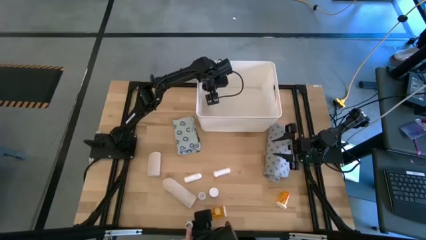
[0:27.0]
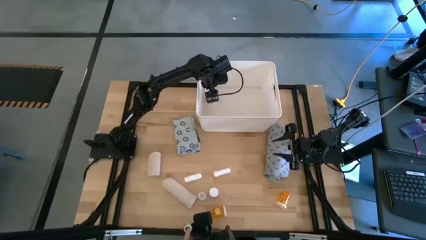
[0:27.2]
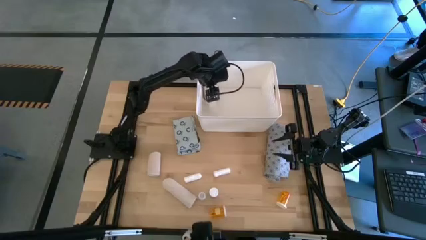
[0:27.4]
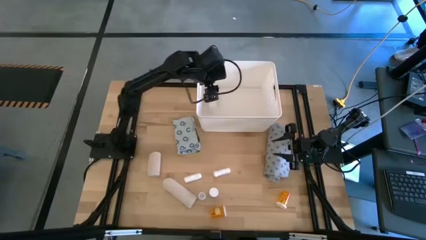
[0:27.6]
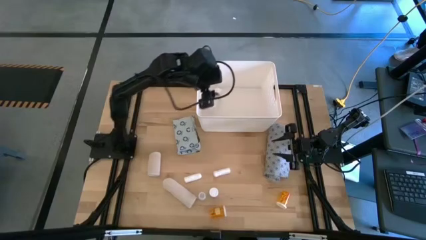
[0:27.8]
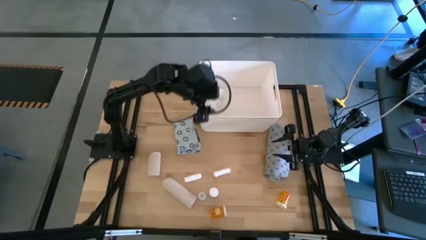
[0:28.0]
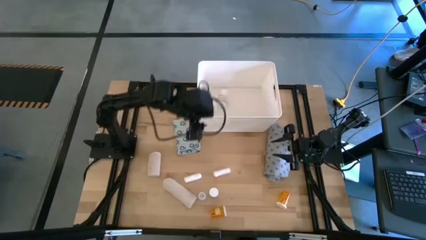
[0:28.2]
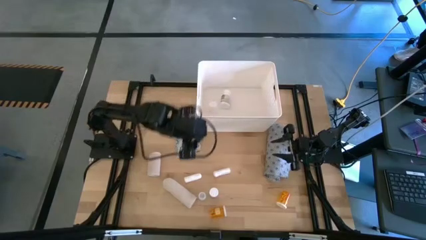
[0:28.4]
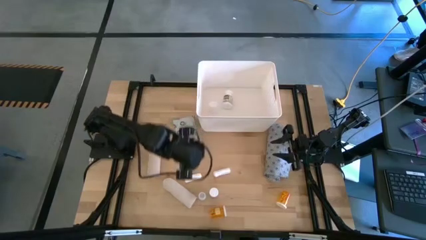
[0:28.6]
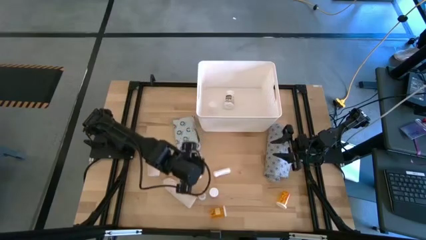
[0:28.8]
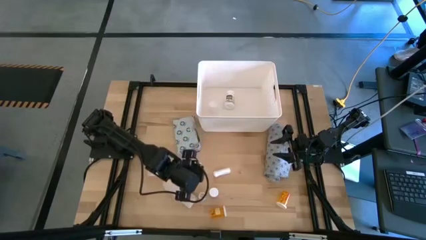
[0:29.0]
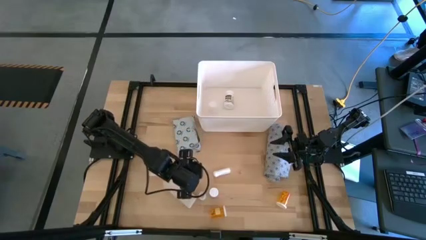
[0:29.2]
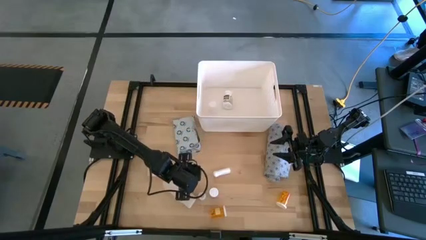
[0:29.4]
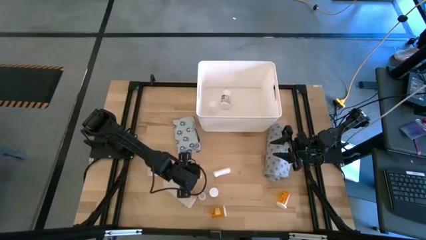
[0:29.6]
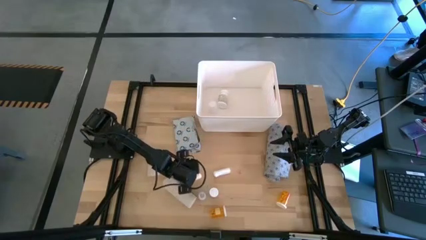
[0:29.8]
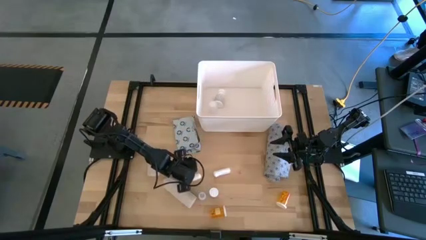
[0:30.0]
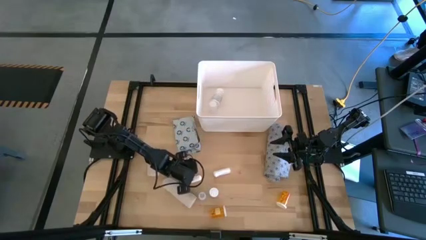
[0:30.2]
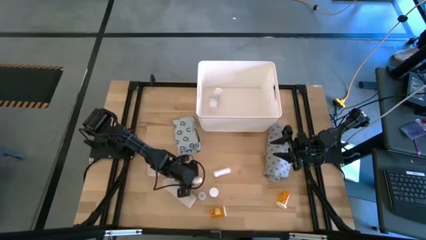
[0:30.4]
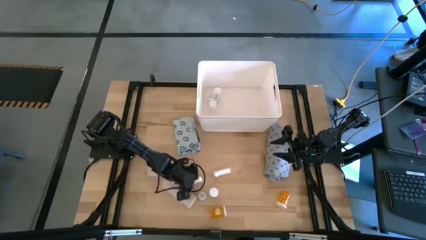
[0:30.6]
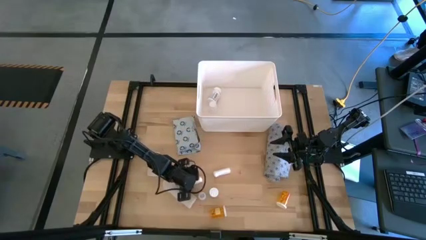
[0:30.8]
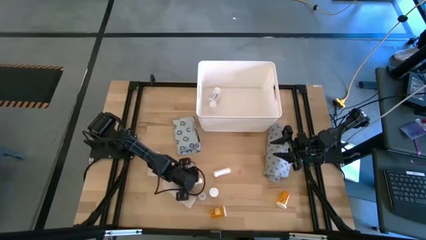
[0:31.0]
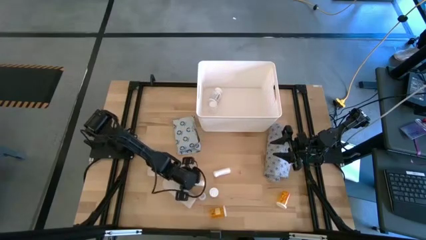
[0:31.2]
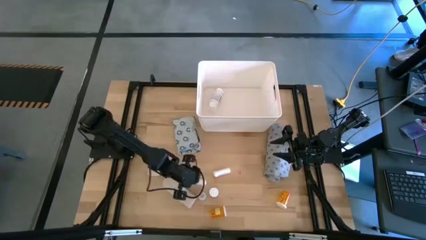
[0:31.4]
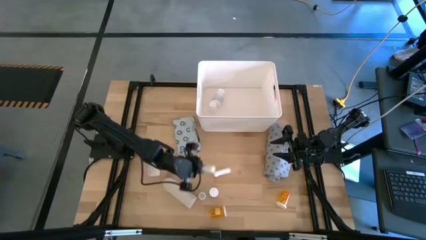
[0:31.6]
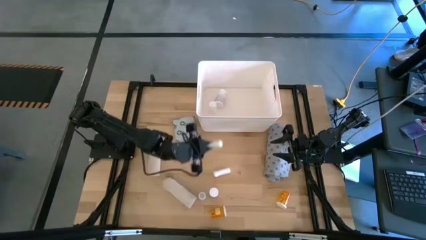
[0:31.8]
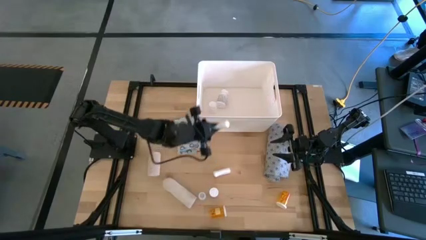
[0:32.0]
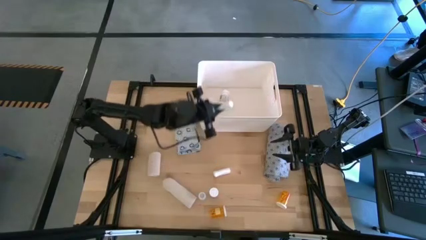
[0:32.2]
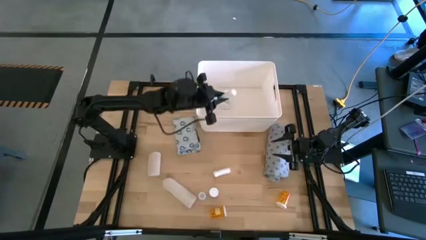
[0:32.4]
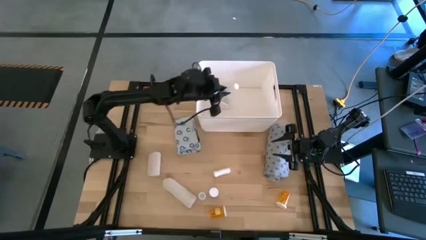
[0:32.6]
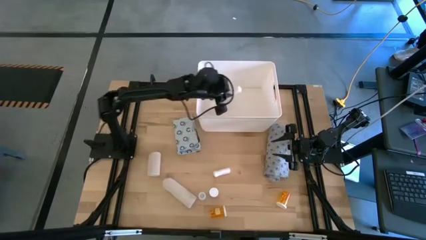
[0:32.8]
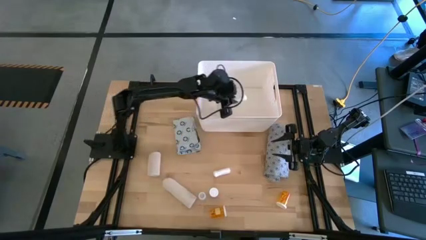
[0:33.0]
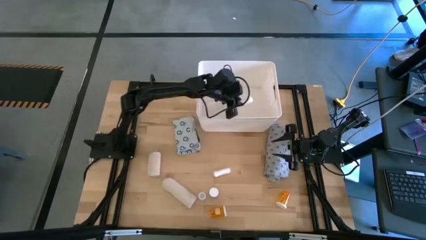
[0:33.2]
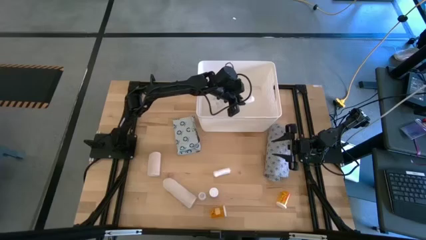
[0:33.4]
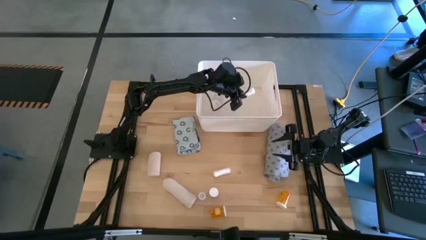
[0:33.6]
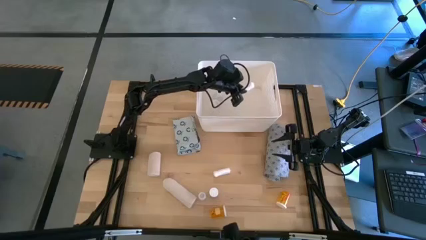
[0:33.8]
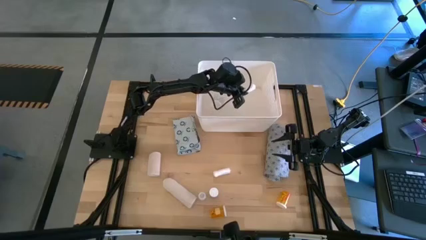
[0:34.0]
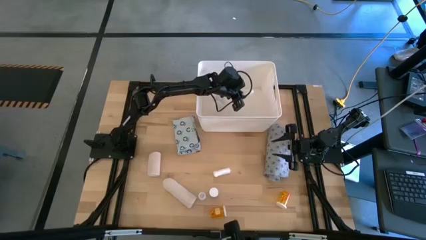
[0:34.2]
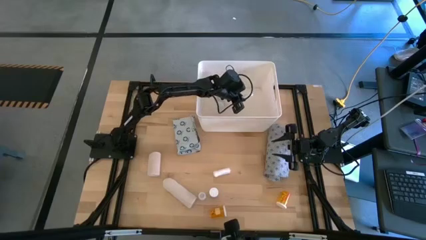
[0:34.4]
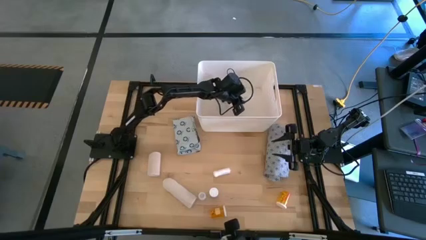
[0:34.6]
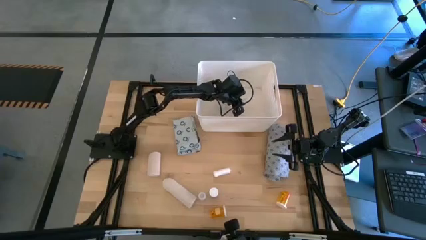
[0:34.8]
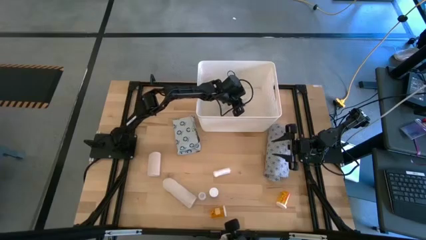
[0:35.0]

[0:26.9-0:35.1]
Task: Pick & place medical supplies in basket/bin
Put the left white rolled gauze into the white bin

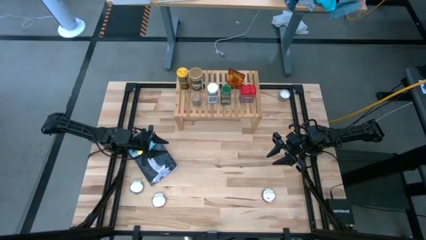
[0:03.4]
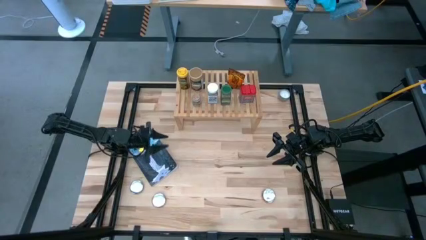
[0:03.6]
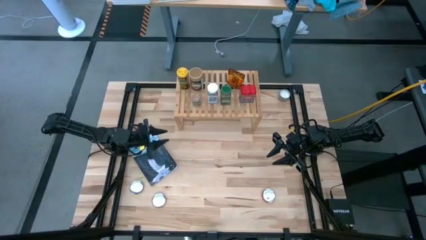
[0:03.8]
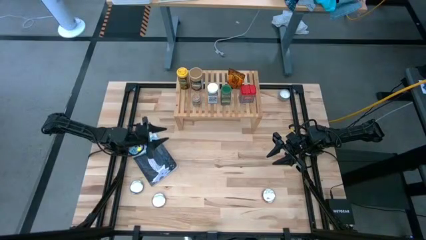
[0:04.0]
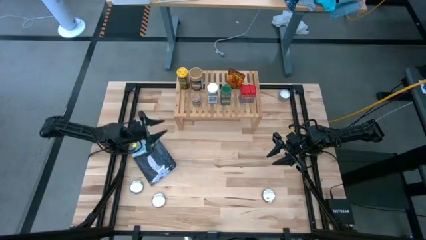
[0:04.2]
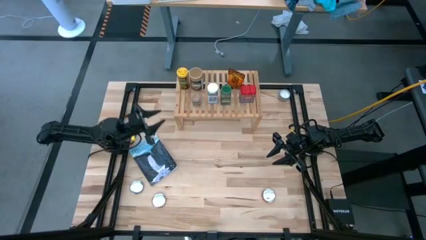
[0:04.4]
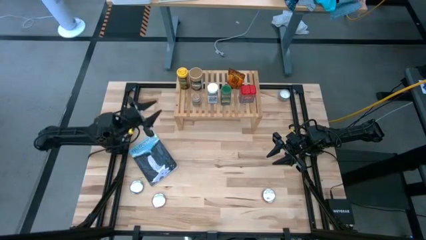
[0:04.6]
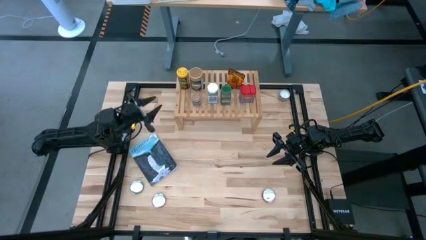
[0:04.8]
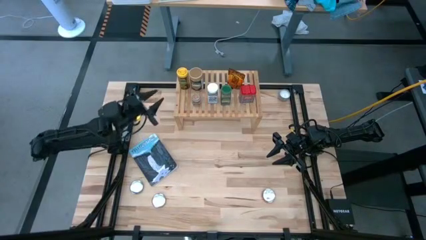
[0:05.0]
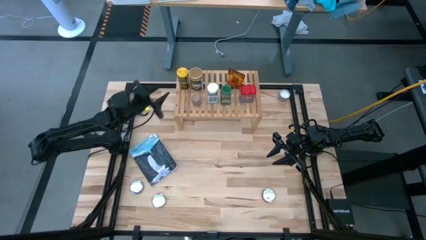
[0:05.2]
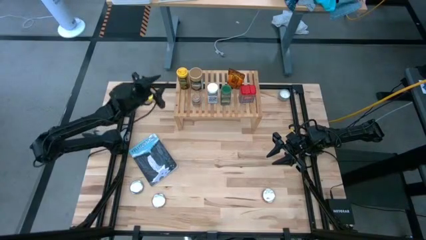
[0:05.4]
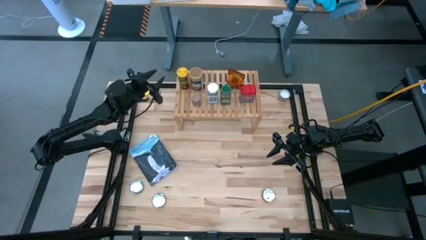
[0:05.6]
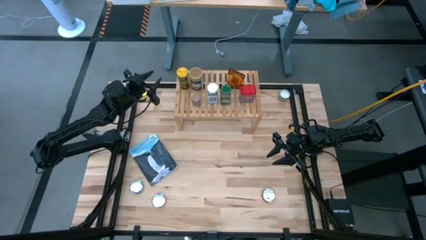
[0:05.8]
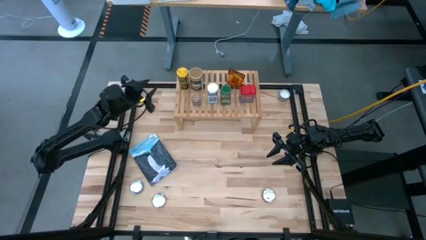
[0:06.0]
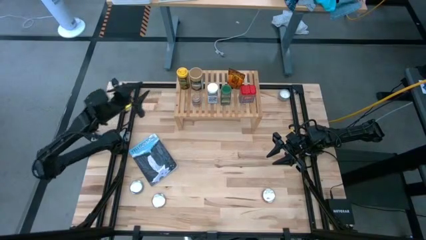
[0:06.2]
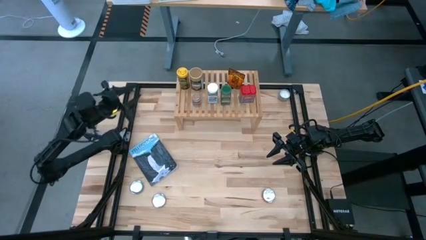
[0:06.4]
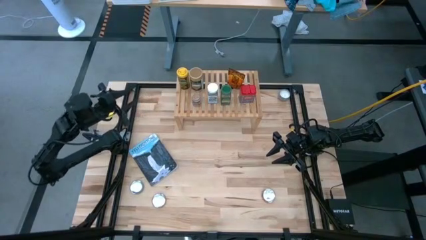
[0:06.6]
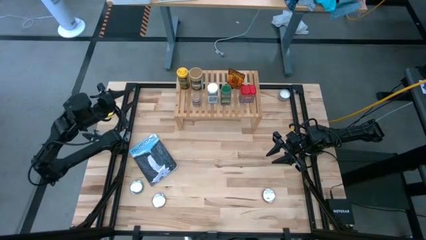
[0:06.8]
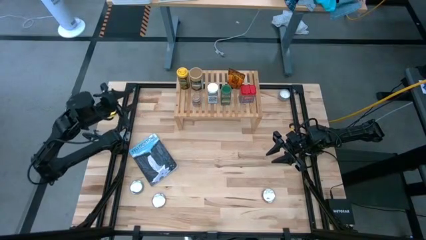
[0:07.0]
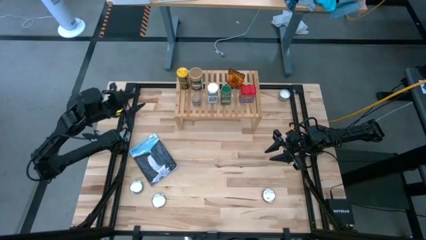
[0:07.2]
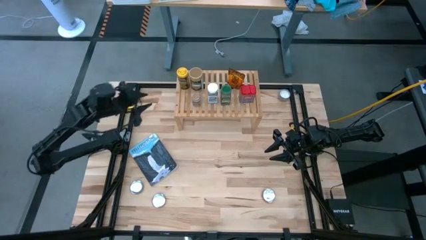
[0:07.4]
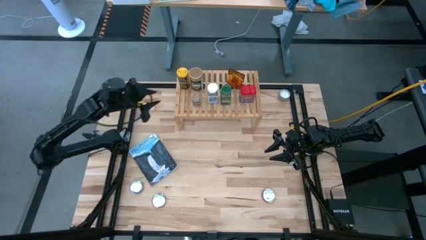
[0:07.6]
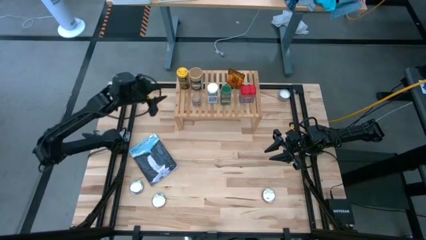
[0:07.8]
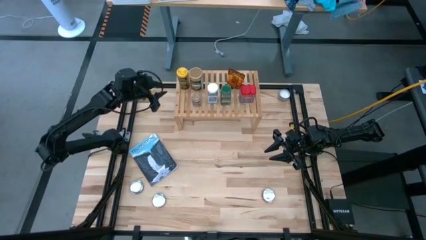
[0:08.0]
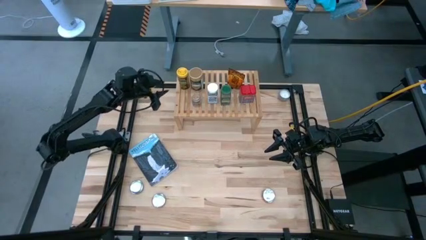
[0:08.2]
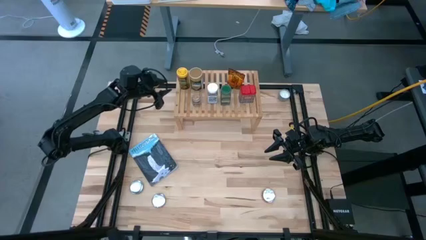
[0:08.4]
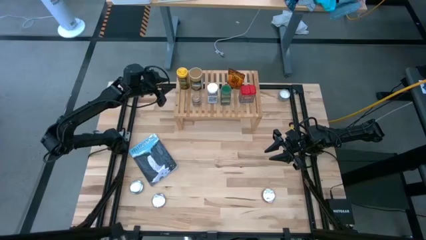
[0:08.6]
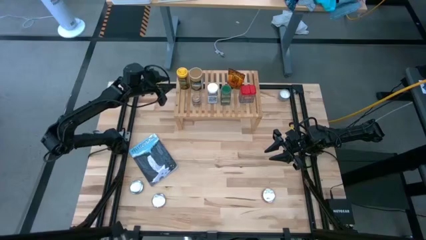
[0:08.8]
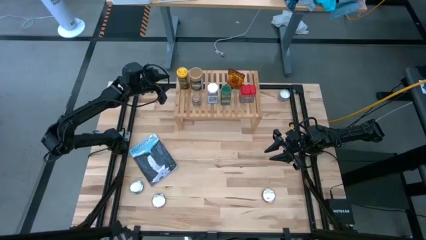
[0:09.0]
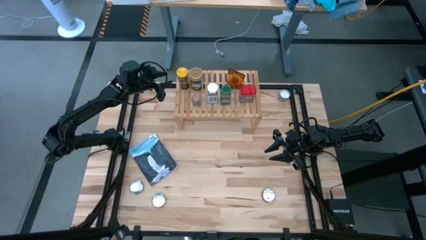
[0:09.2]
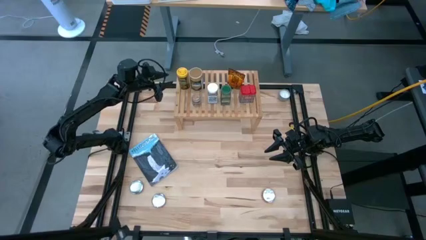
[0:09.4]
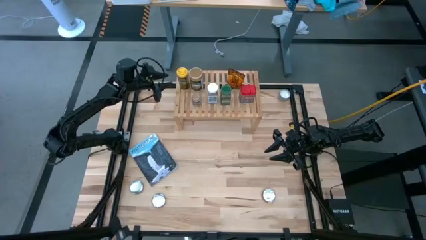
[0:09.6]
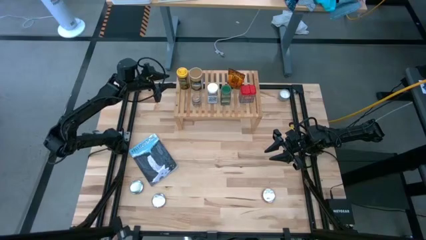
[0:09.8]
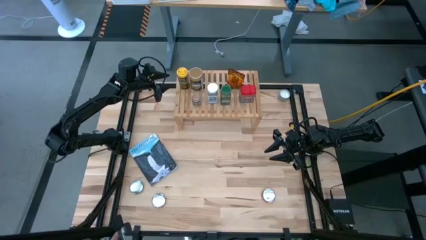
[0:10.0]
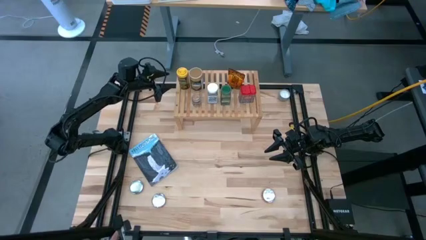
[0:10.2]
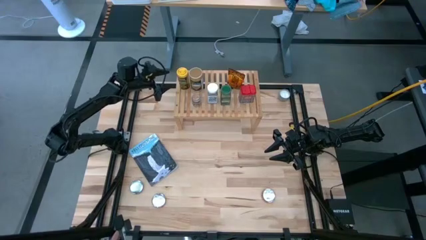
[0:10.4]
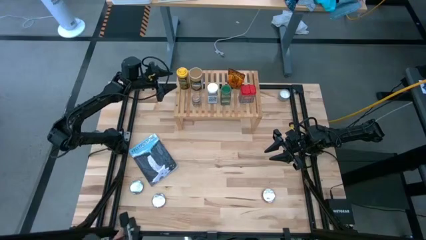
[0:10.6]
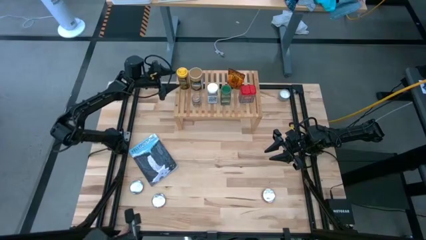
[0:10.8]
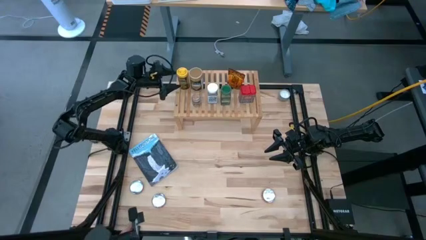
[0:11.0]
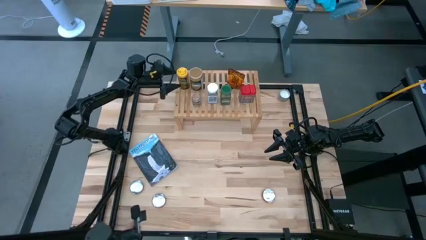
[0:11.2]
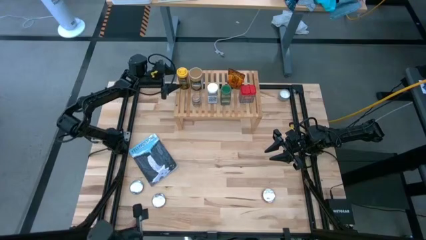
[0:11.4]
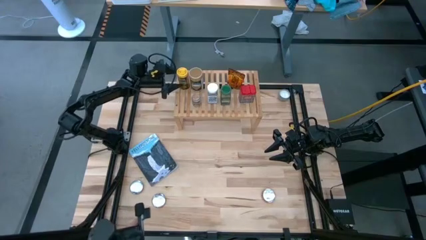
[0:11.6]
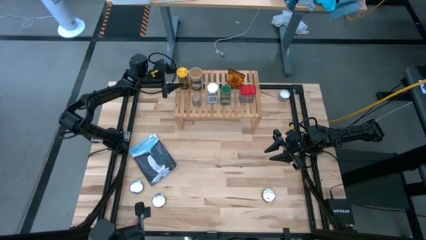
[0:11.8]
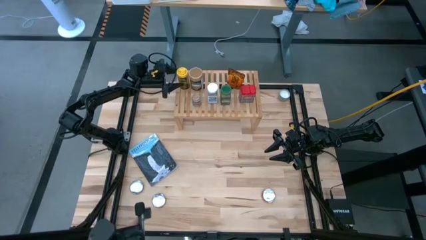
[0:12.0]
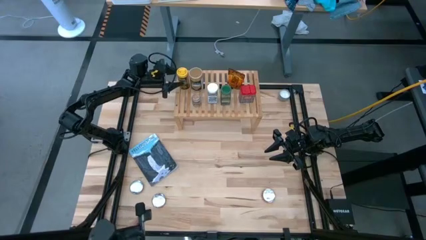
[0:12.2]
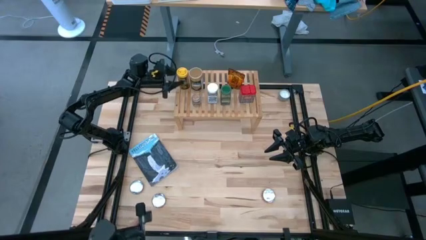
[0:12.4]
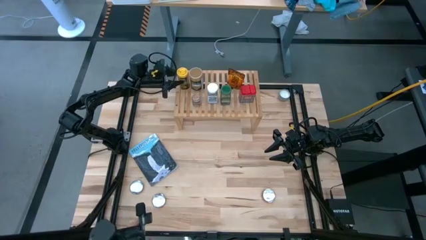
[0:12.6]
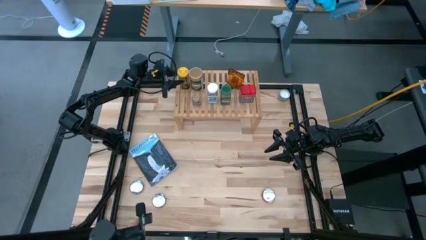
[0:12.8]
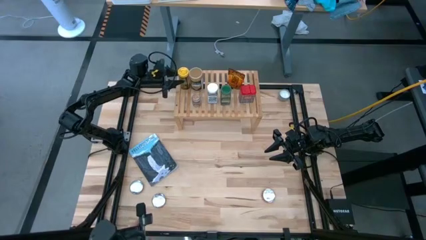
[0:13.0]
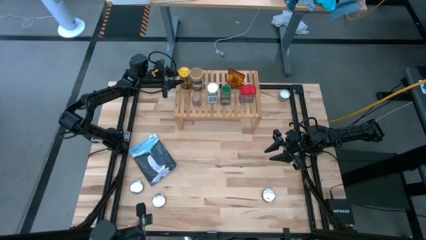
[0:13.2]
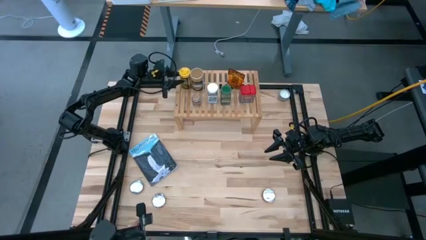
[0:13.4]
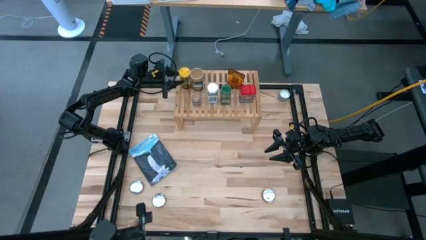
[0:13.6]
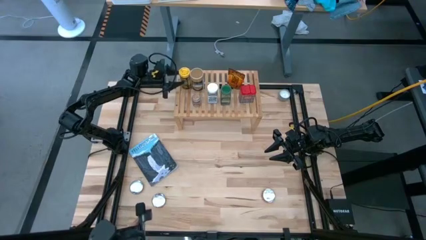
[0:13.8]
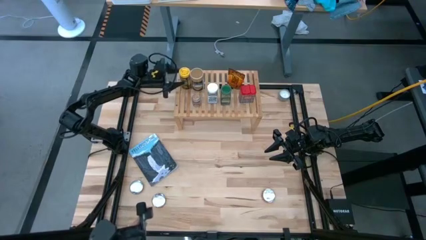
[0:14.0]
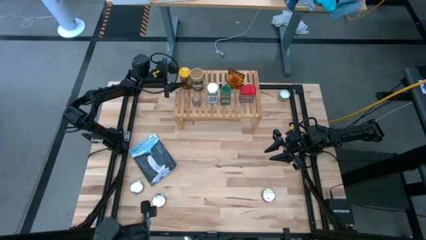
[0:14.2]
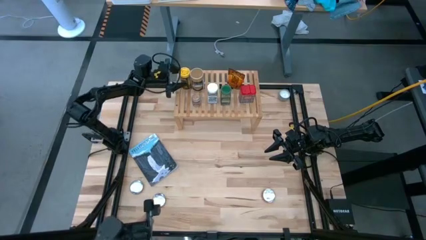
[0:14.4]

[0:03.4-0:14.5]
Task: Shelf spices
Remove the yellow seasoning bottle from the shelf
